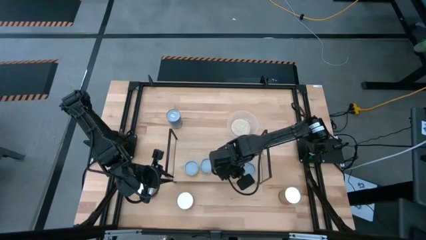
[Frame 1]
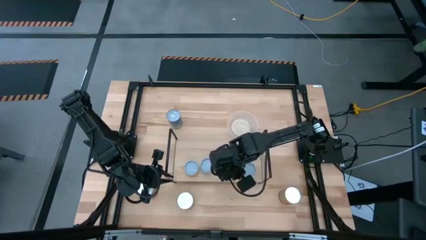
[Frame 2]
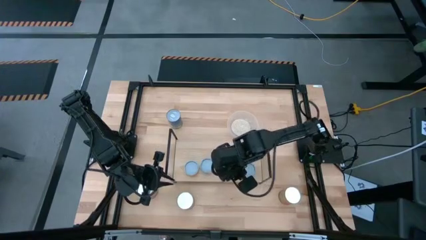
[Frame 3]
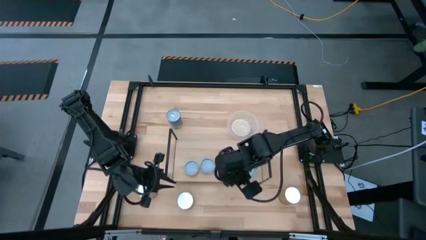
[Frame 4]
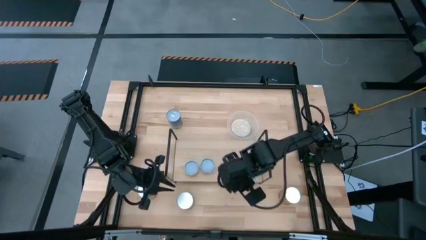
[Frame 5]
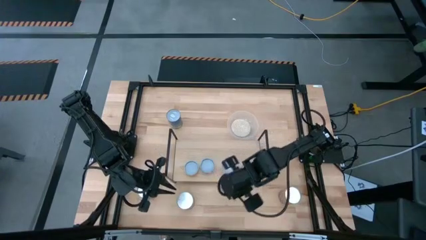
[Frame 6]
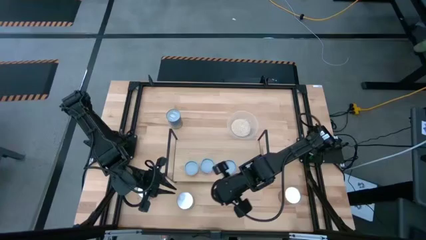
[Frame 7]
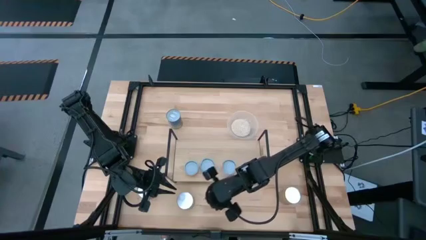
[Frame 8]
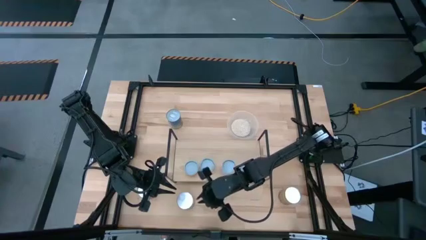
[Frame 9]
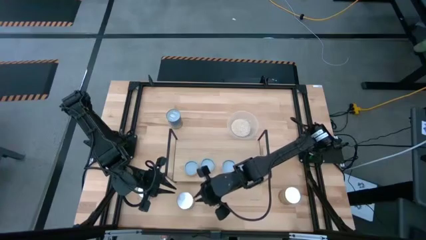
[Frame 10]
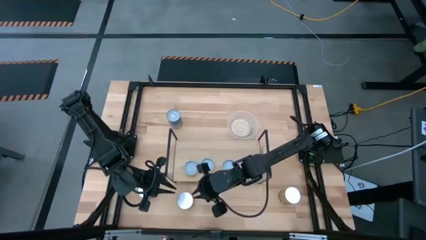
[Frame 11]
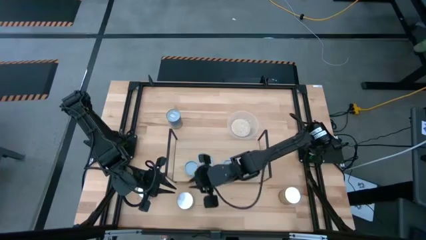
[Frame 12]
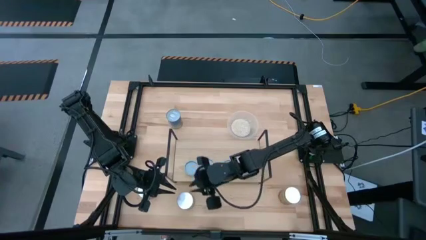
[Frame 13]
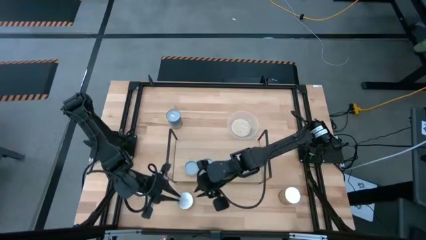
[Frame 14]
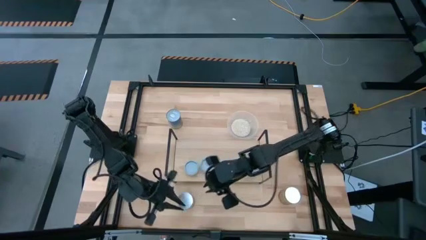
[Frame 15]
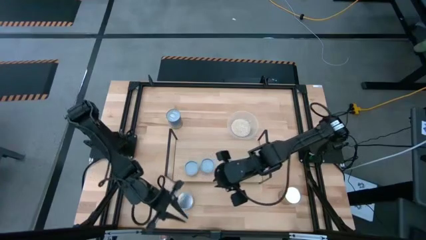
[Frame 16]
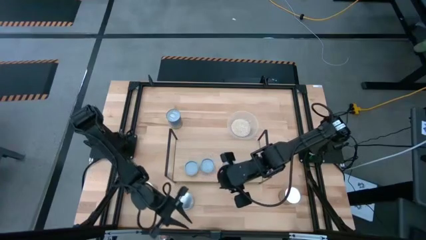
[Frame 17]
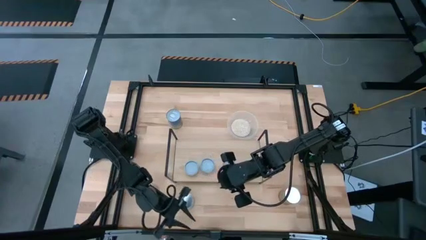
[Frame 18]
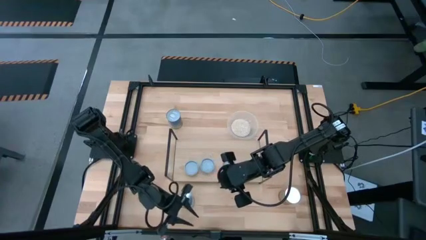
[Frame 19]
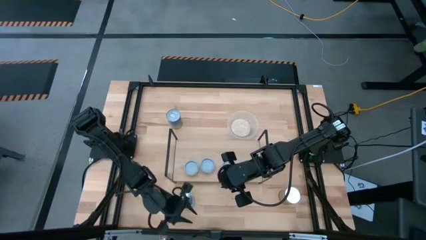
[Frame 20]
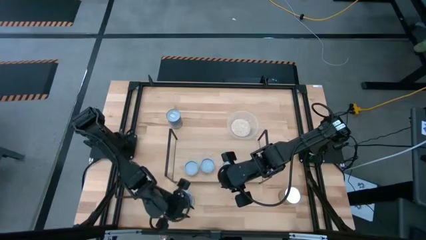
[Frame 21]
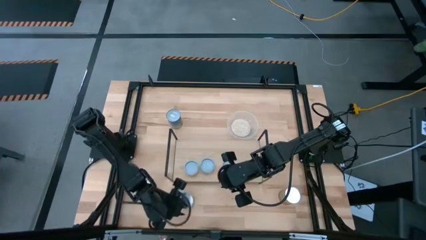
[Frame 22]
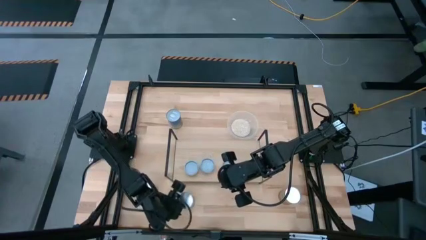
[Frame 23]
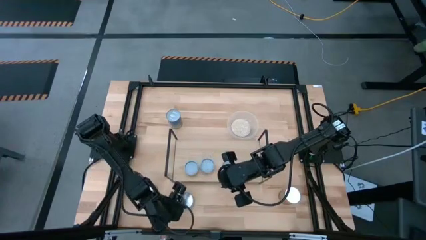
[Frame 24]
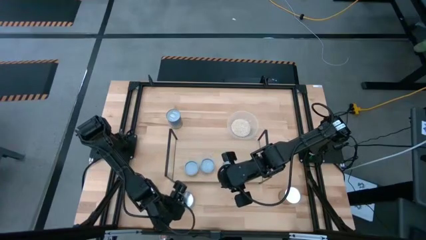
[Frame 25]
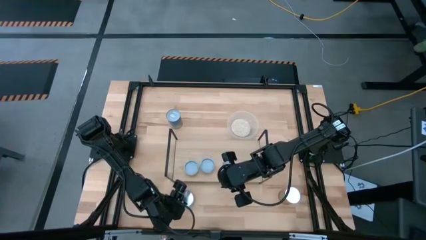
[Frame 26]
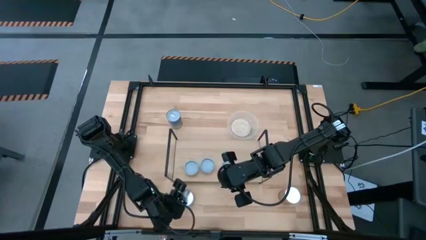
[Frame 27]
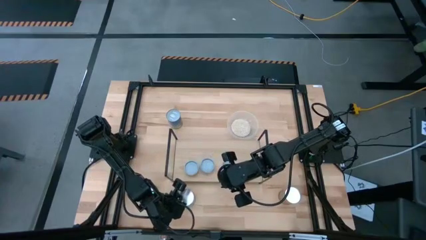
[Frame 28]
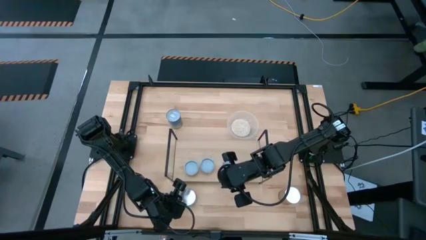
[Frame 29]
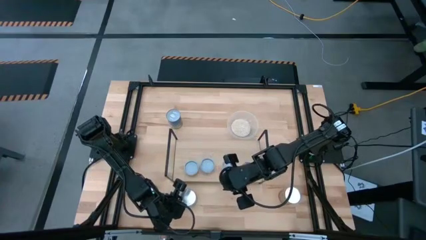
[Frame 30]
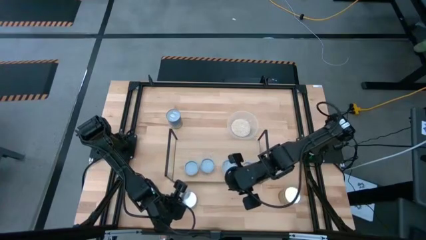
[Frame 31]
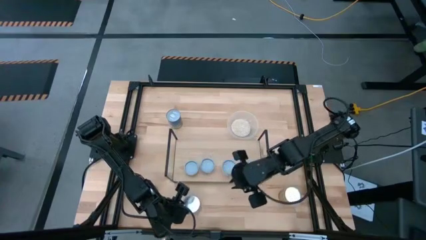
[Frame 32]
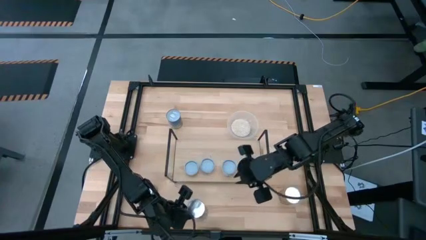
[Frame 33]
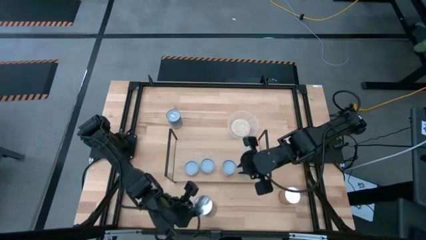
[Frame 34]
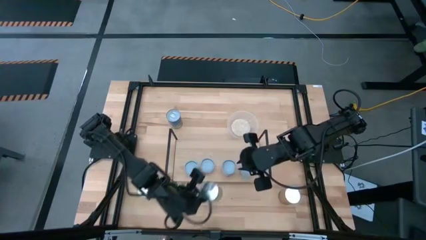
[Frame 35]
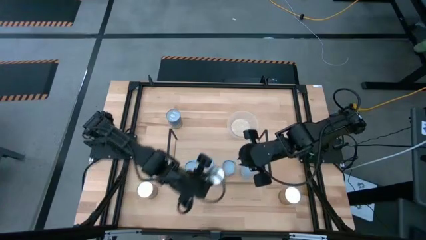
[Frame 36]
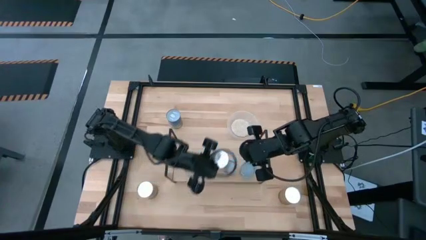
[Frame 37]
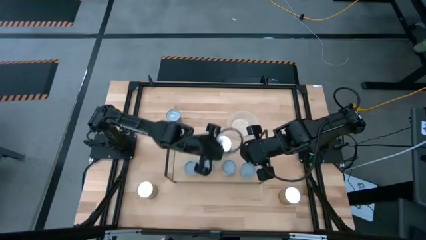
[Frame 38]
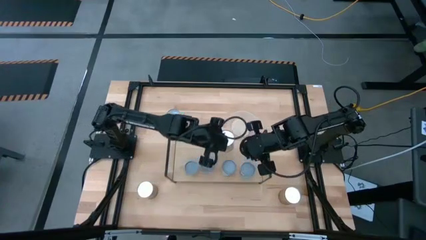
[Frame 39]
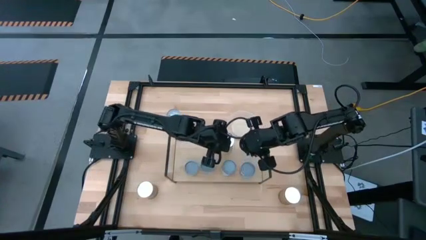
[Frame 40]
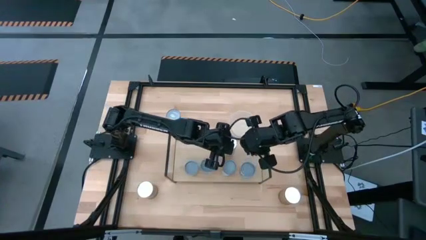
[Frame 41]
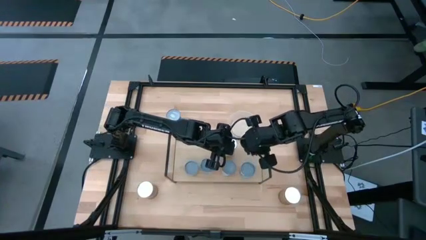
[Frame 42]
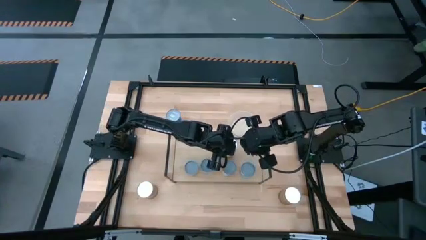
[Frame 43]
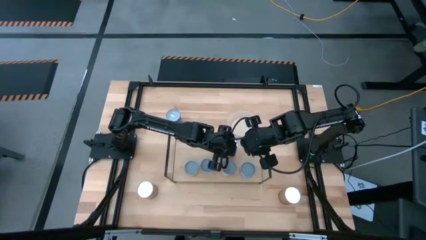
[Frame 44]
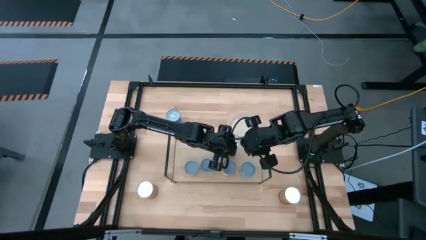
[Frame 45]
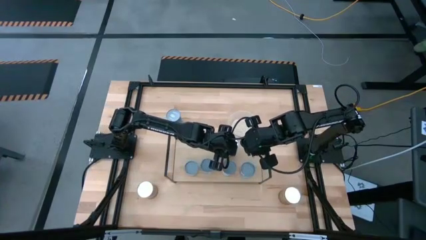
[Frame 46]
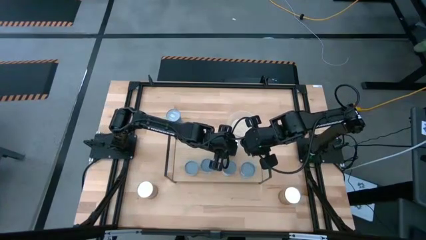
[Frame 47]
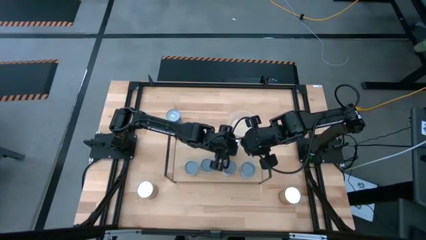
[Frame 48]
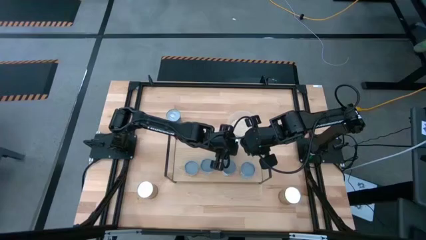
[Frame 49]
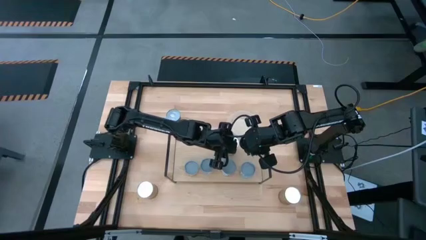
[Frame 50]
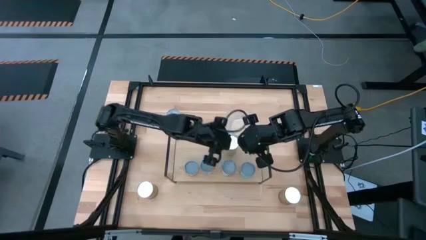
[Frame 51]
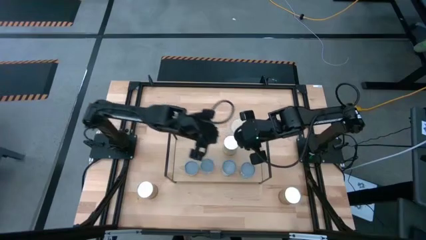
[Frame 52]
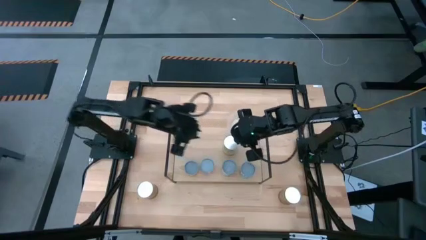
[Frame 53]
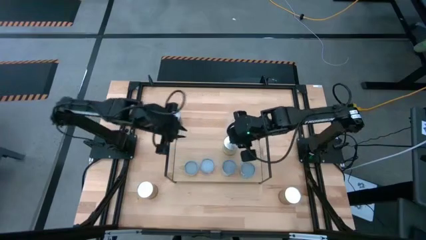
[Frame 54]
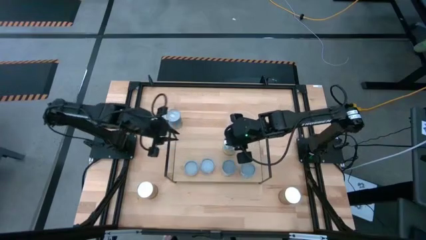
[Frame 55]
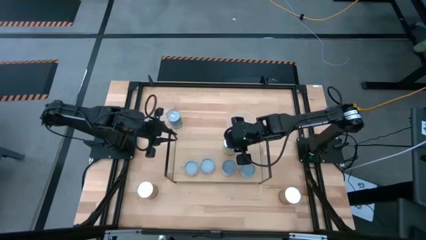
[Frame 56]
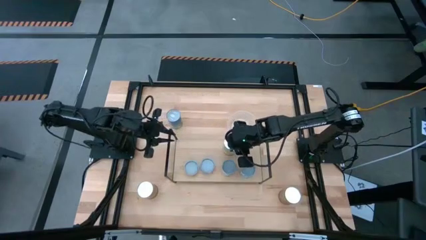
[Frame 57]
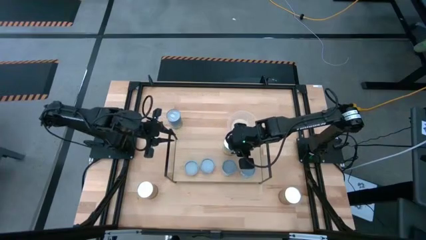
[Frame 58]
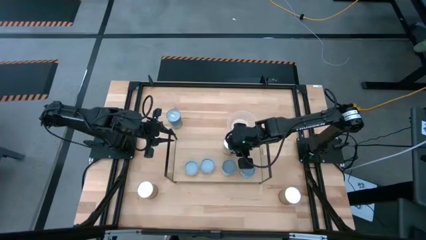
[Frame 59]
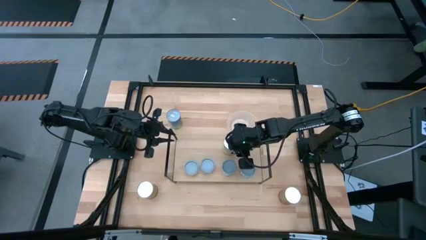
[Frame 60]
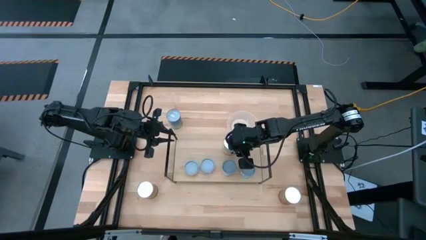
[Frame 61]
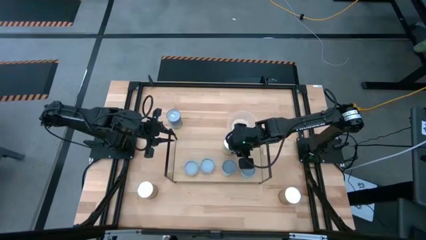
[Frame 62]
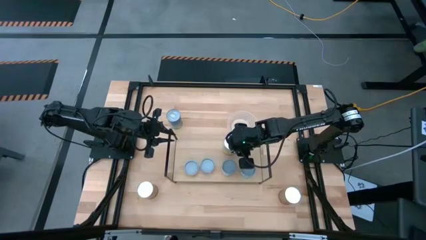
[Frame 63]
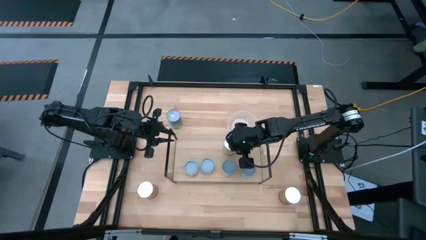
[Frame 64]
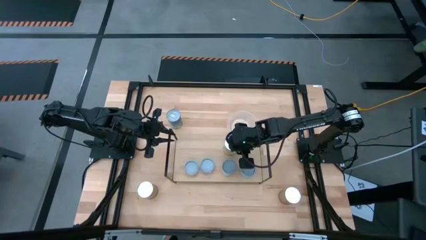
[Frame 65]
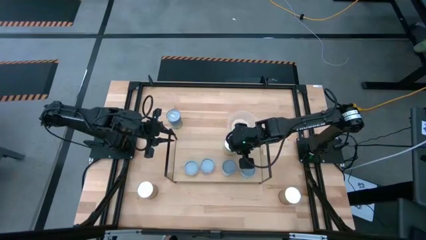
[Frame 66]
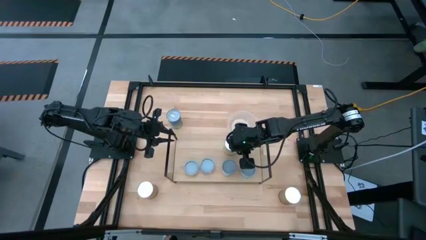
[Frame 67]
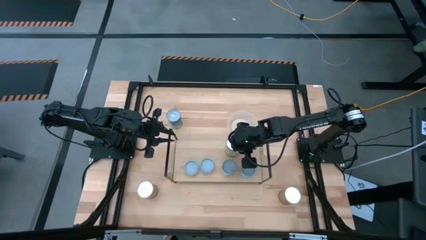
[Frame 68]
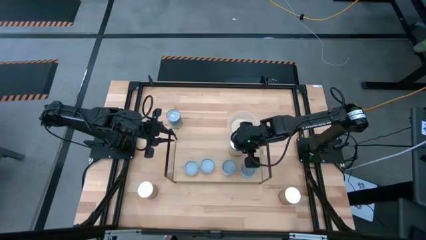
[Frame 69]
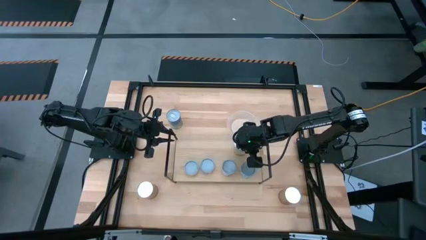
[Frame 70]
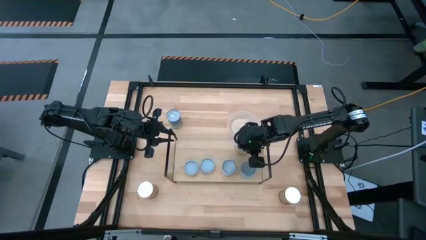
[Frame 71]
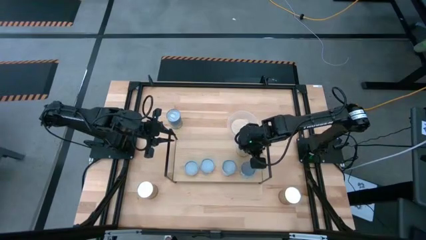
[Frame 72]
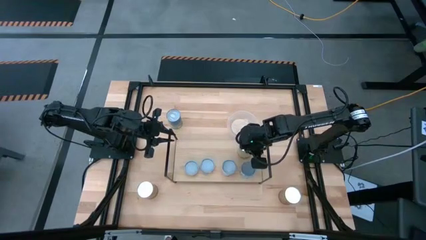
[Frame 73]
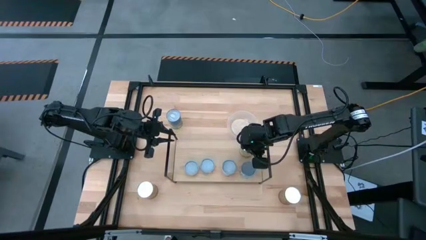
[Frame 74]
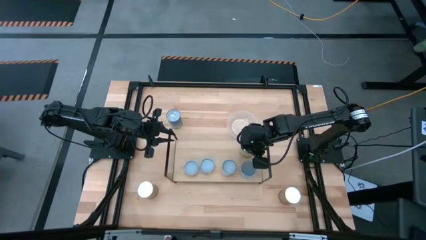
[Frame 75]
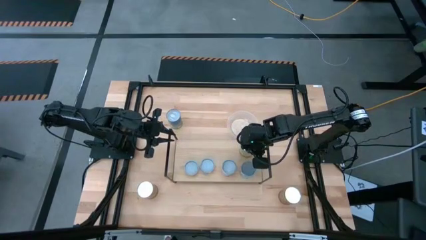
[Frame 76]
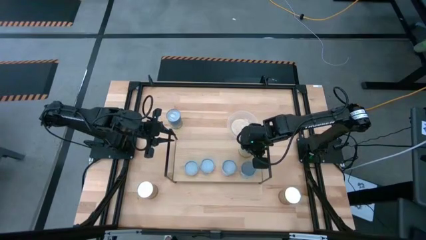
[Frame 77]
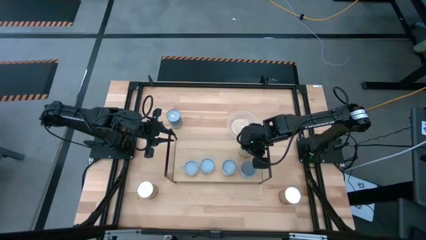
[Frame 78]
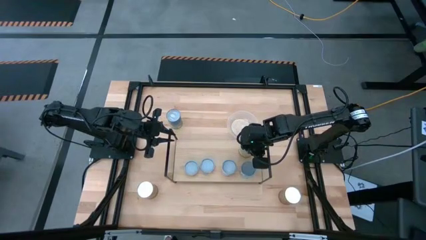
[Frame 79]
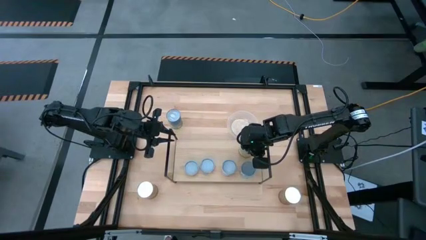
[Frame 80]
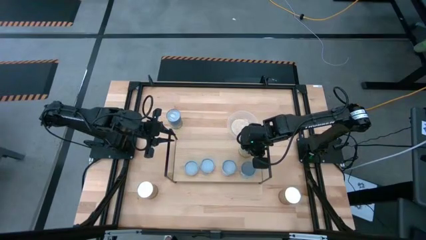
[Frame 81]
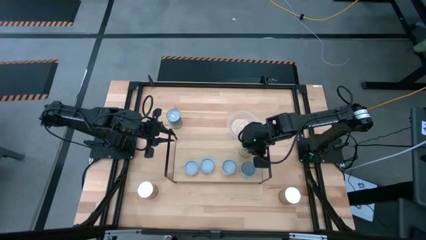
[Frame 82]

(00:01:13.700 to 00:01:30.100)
Task: Pick and place cans onto a shelf
Put the canned carrots on the shelf
